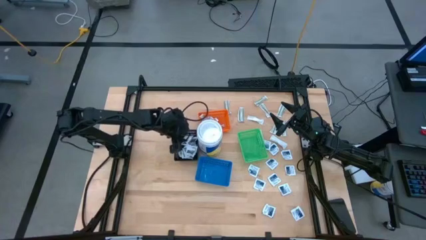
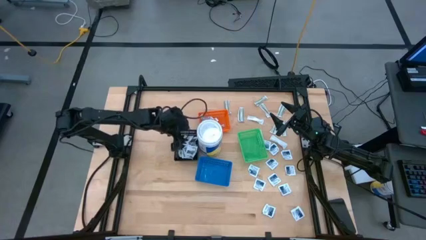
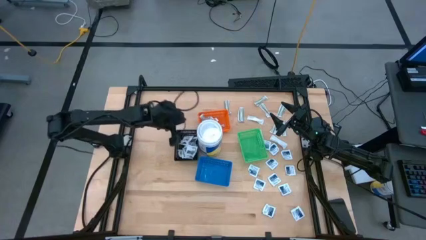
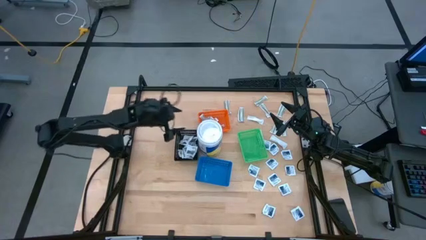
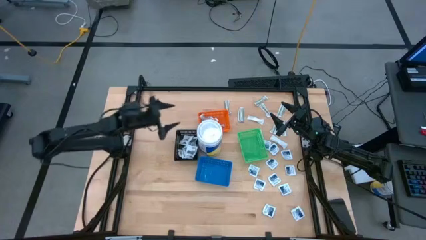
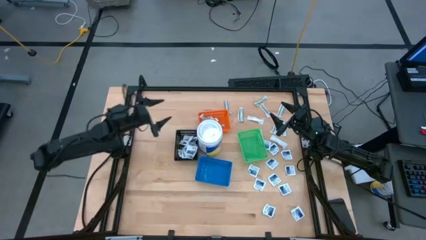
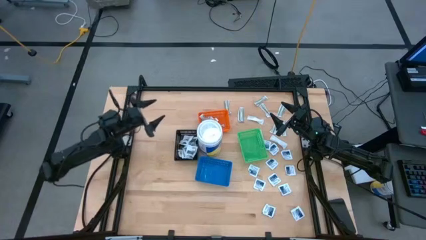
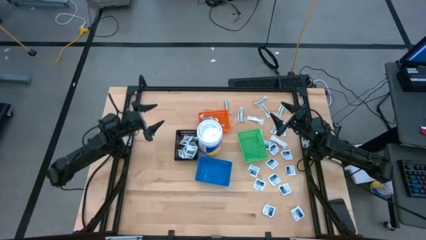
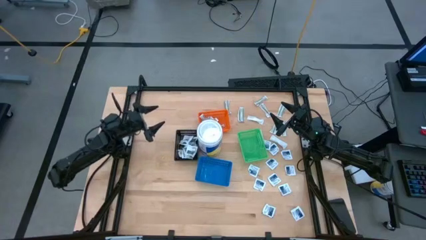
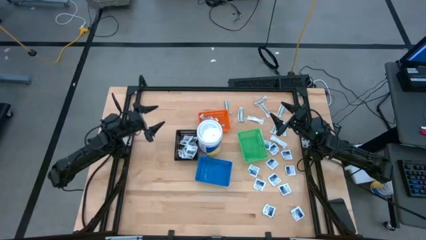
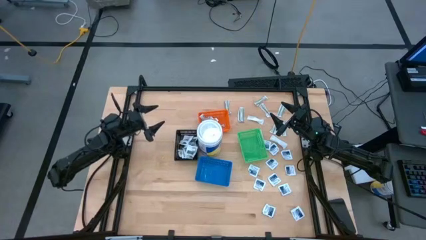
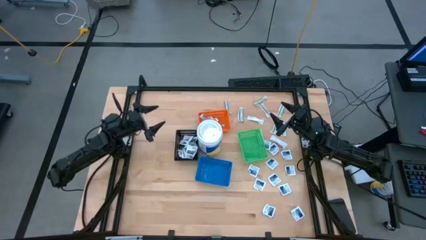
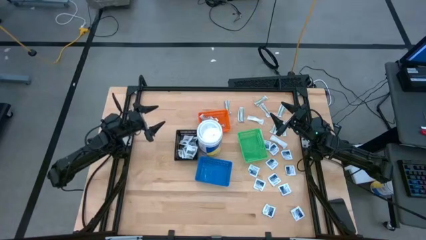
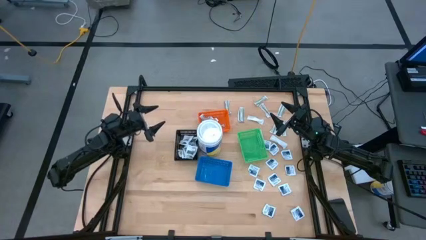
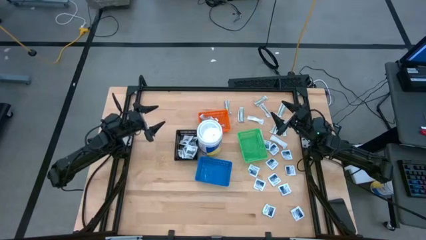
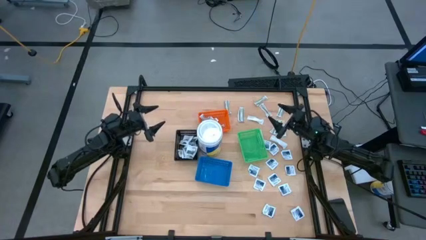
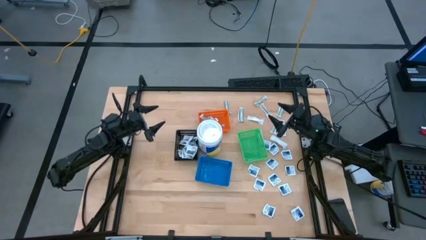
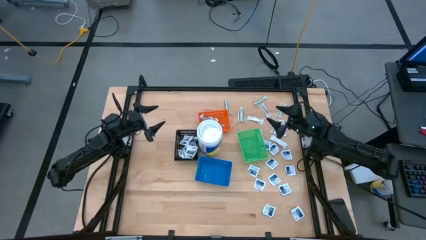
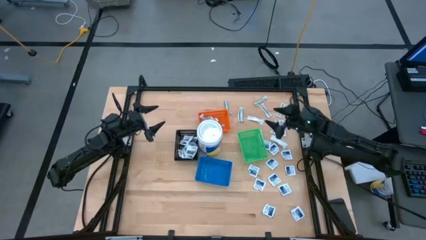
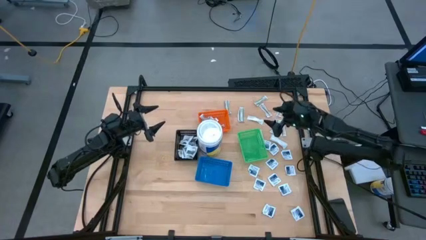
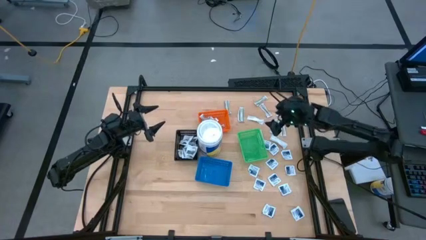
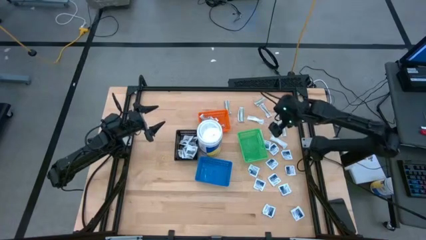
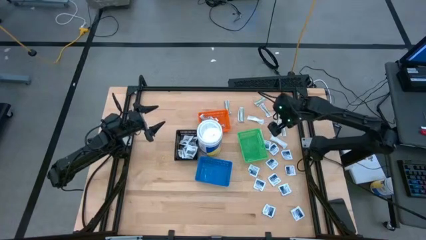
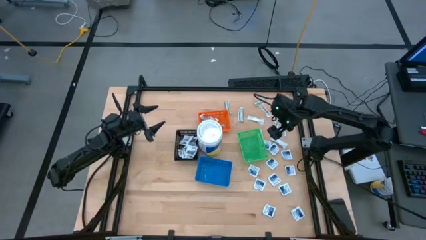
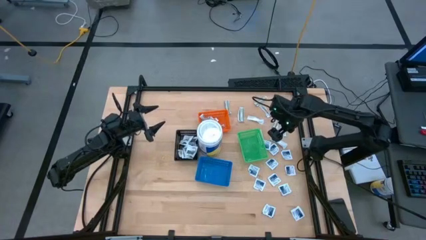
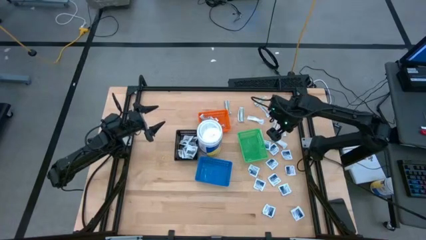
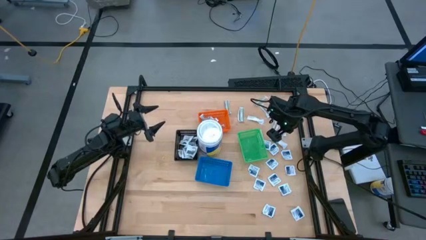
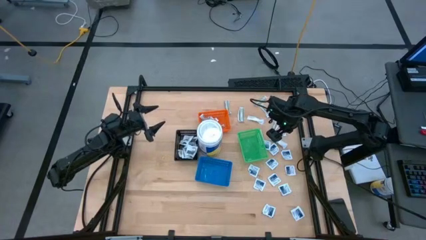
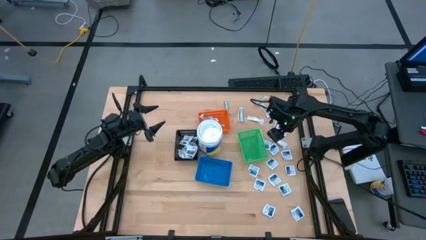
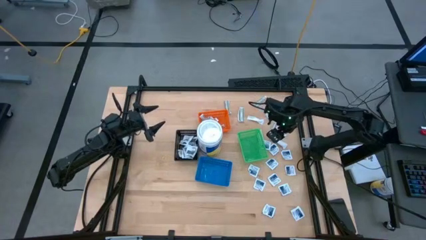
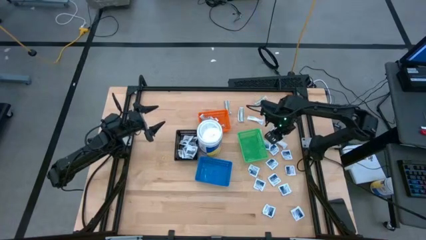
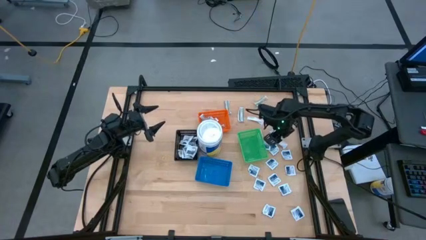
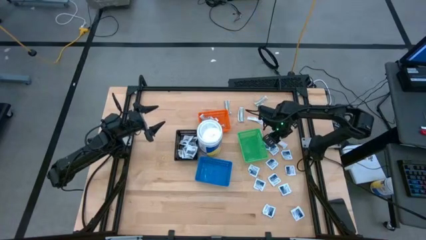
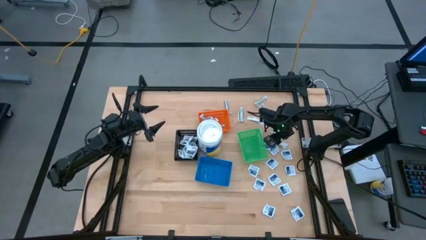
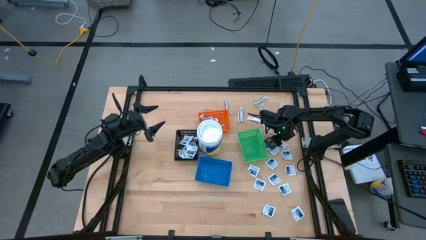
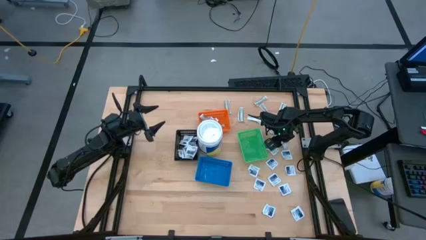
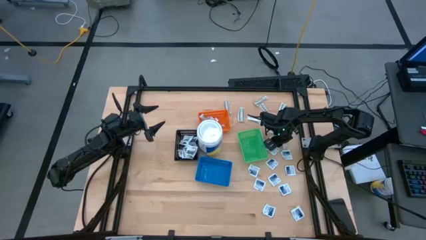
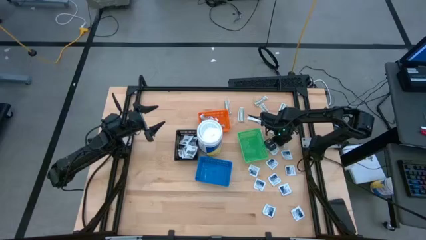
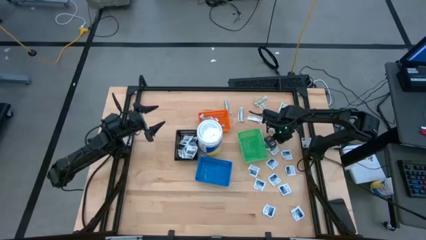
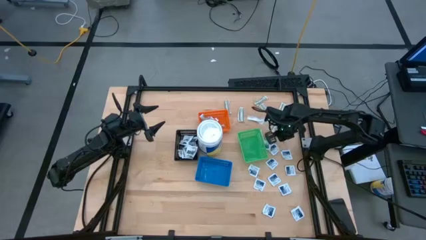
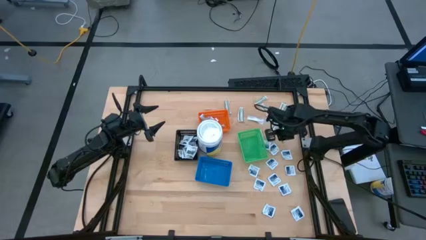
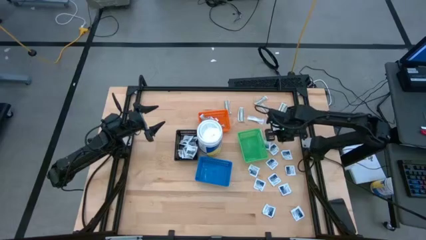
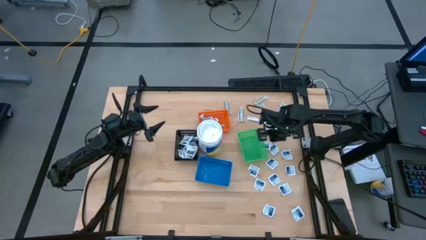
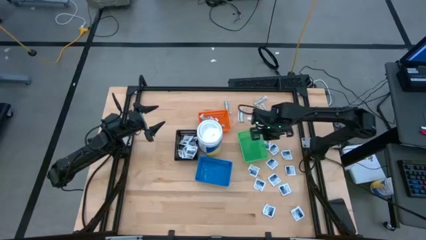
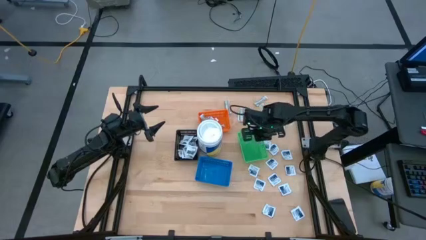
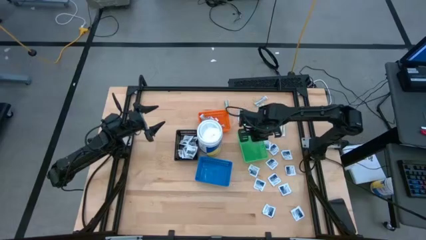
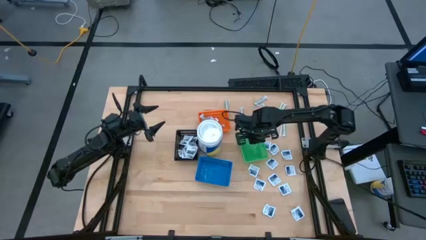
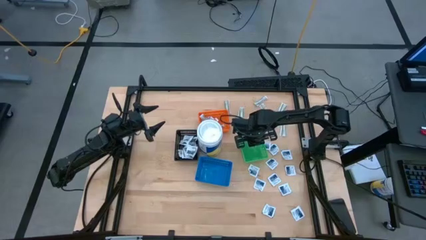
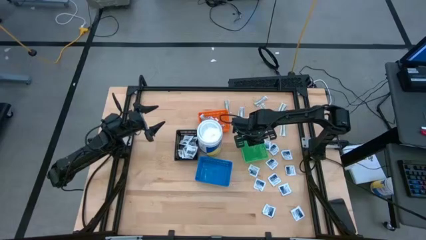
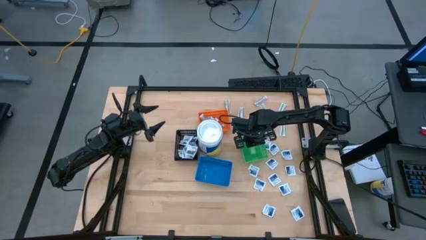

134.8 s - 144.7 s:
Task: Pick & Place First Aid Supplies
Put the green bandage pack into the green bin

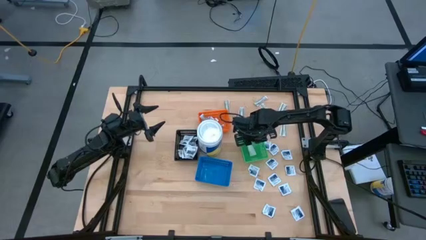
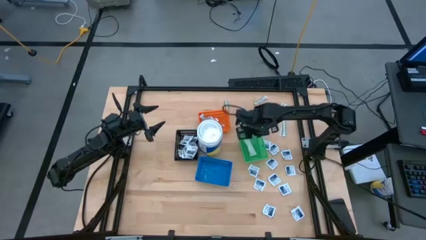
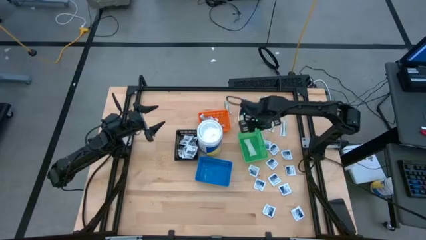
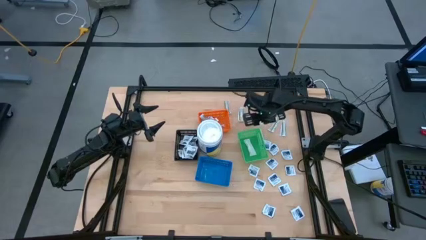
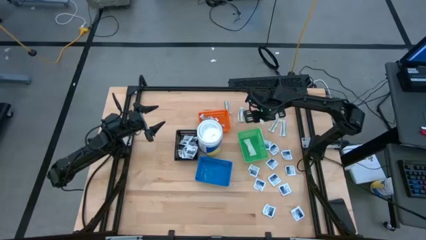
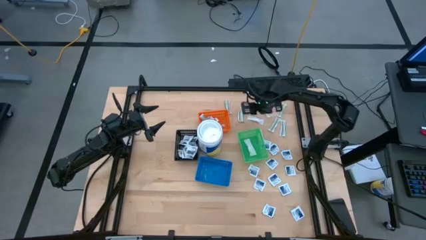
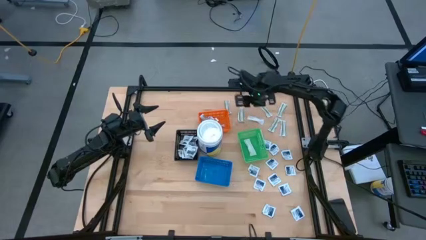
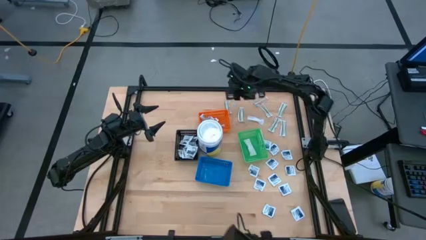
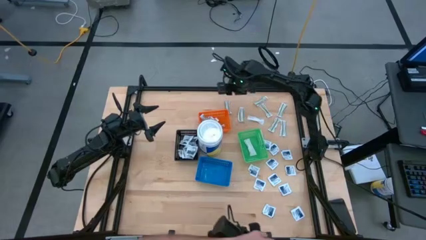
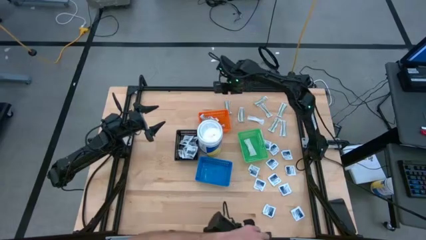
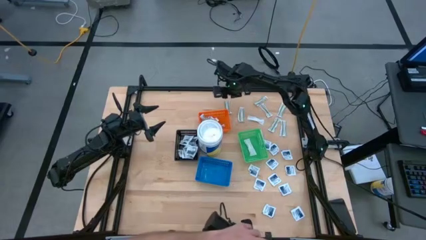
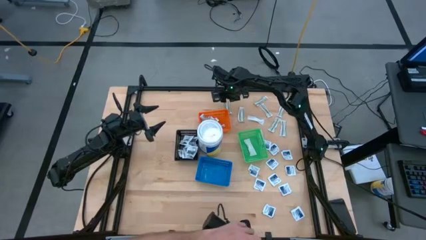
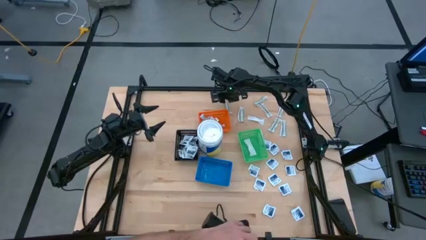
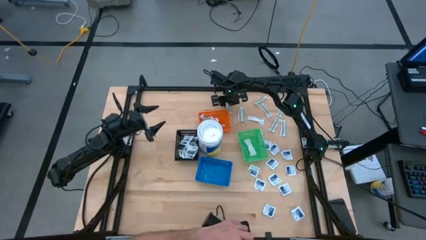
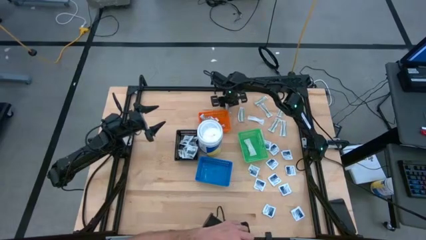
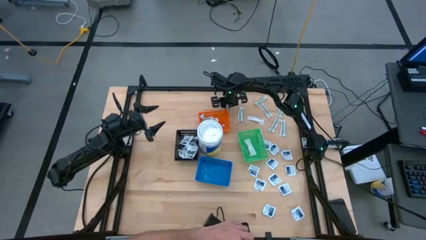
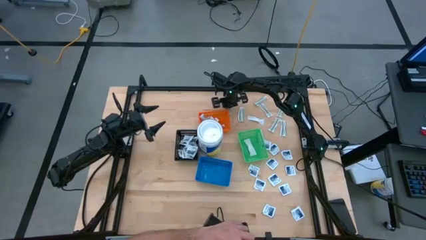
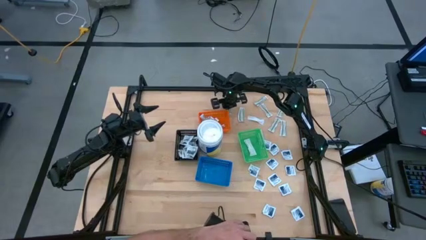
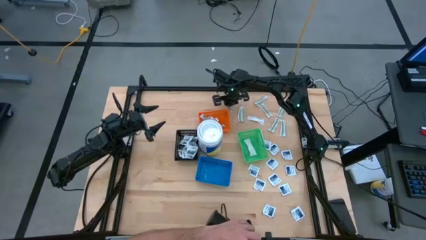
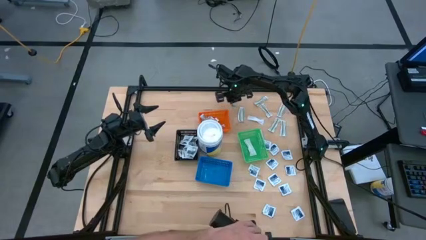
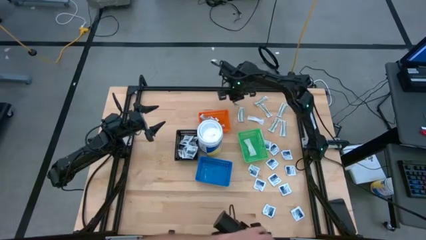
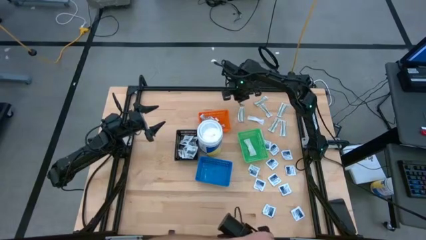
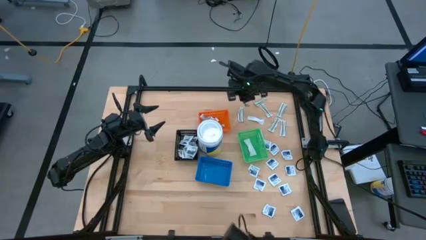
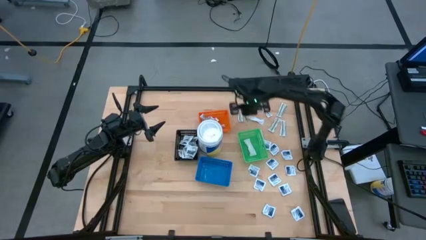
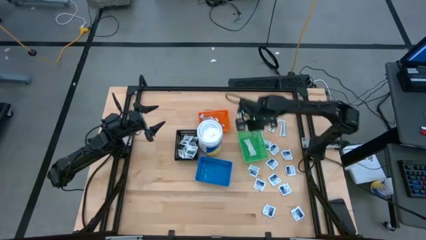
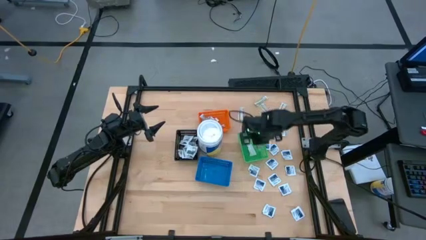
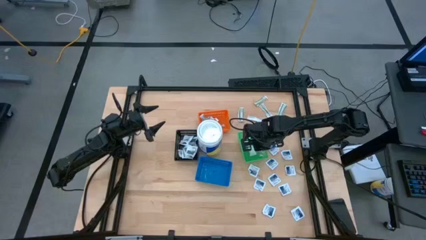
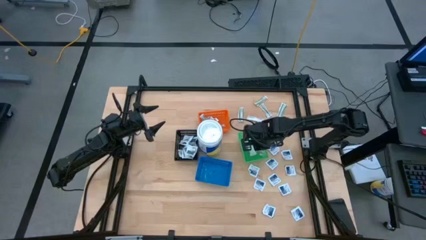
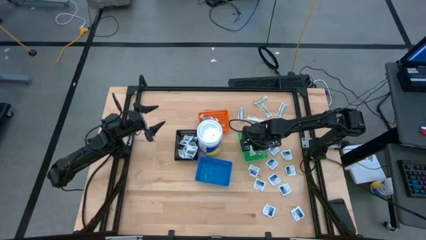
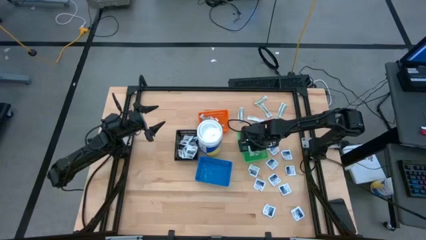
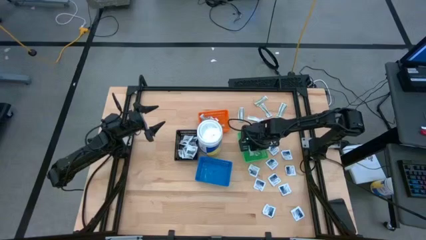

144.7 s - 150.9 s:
Put the green bandage pack into the green bin
